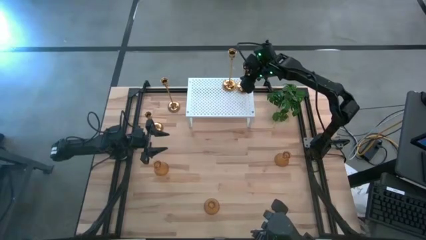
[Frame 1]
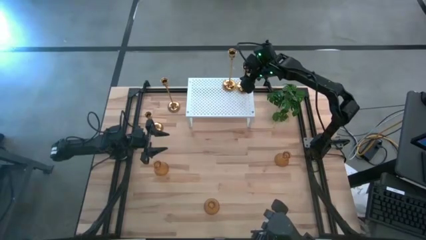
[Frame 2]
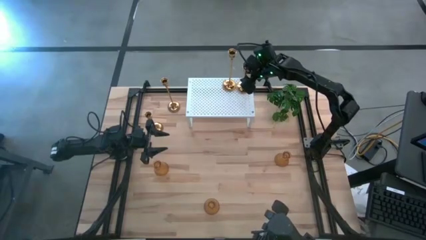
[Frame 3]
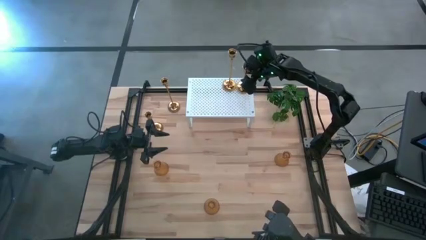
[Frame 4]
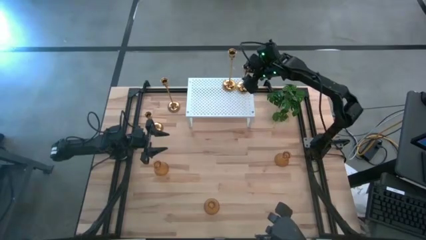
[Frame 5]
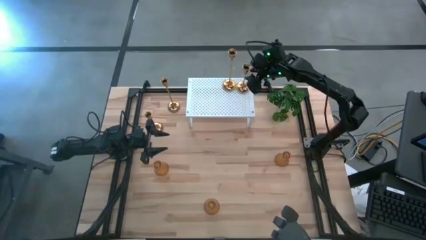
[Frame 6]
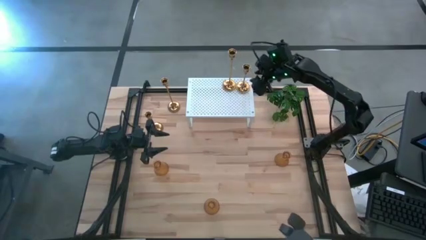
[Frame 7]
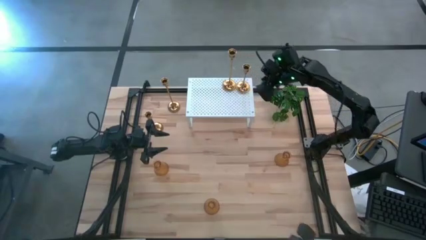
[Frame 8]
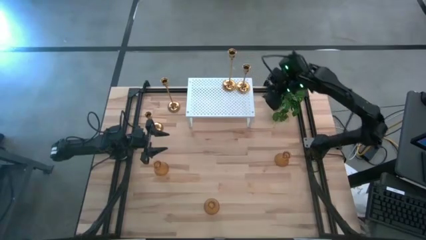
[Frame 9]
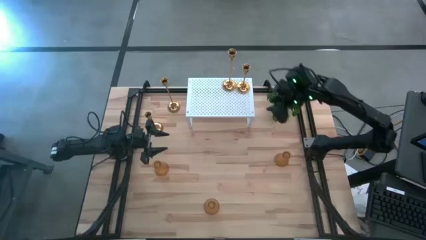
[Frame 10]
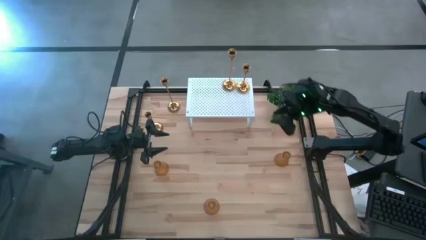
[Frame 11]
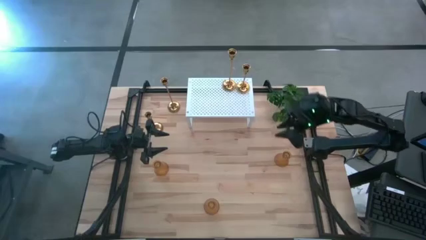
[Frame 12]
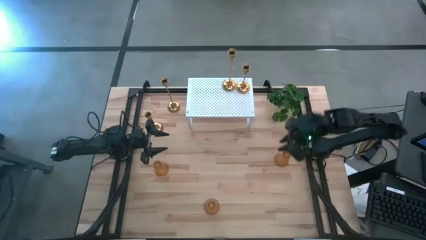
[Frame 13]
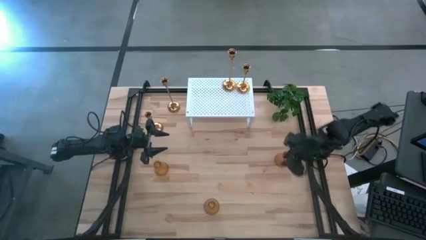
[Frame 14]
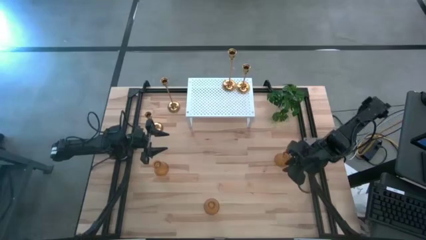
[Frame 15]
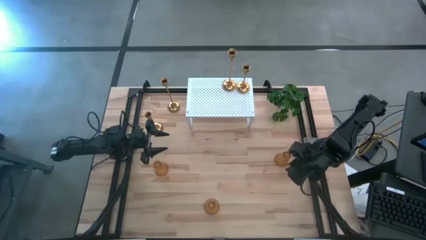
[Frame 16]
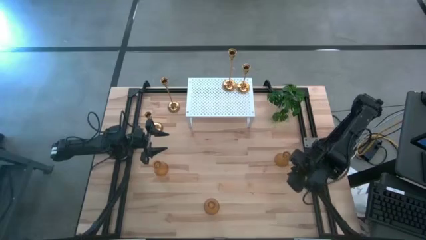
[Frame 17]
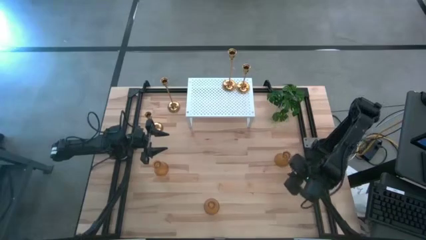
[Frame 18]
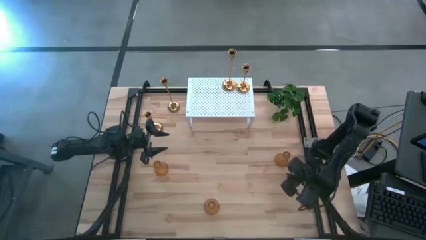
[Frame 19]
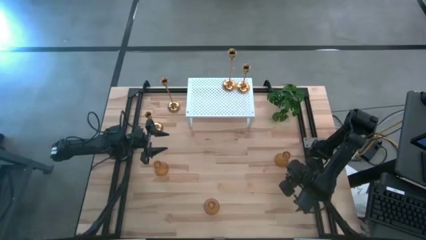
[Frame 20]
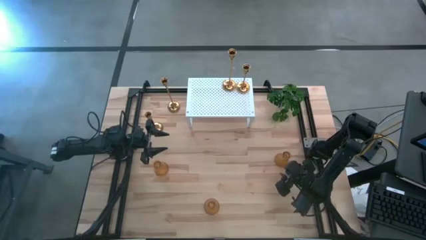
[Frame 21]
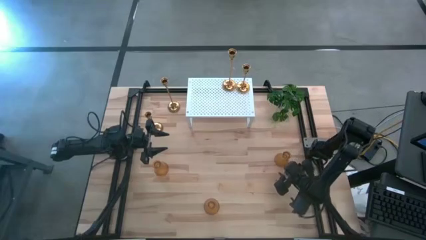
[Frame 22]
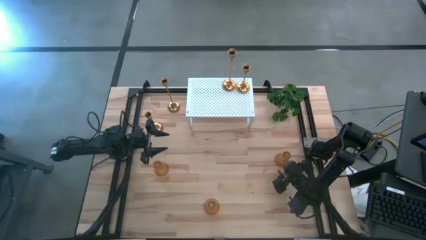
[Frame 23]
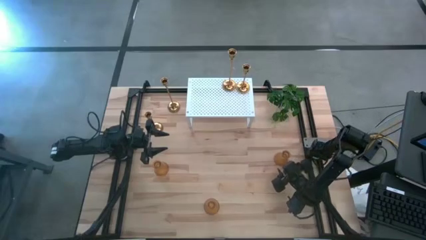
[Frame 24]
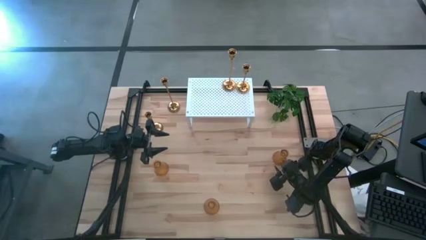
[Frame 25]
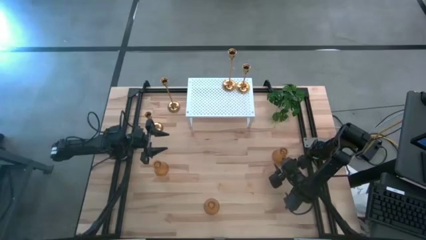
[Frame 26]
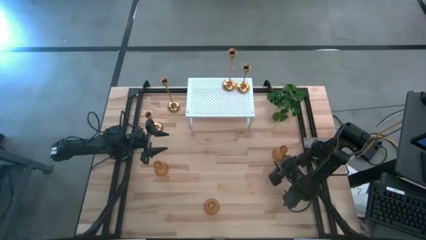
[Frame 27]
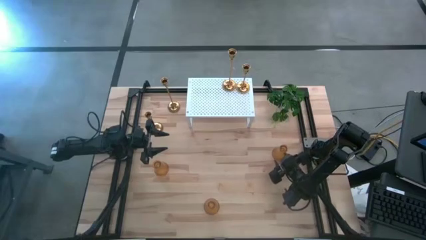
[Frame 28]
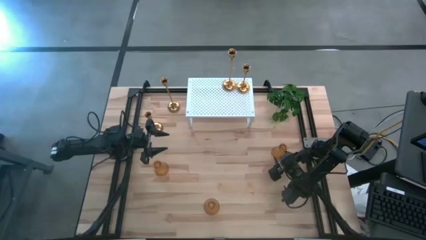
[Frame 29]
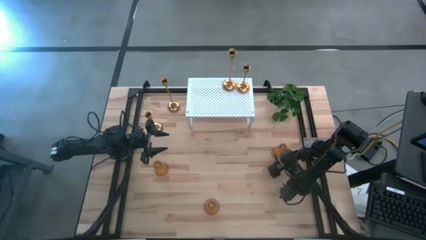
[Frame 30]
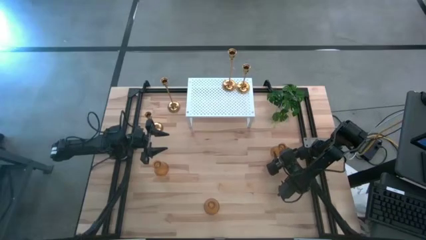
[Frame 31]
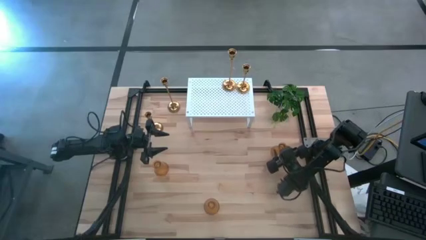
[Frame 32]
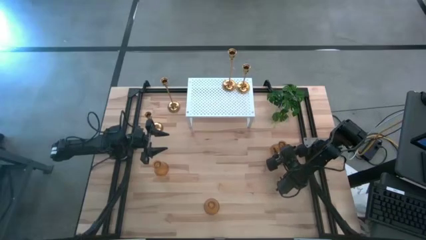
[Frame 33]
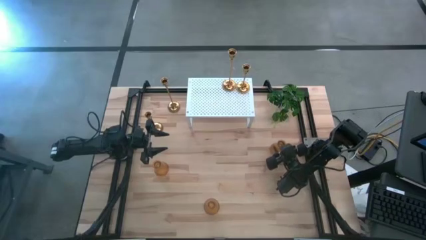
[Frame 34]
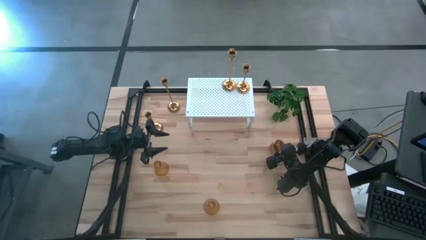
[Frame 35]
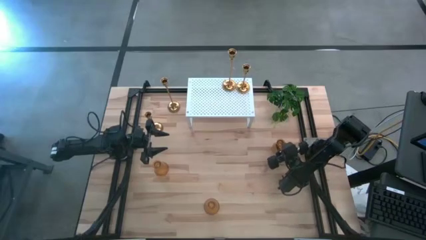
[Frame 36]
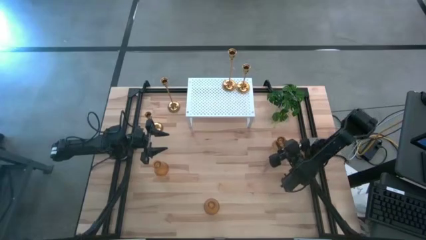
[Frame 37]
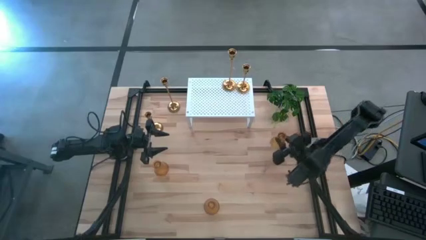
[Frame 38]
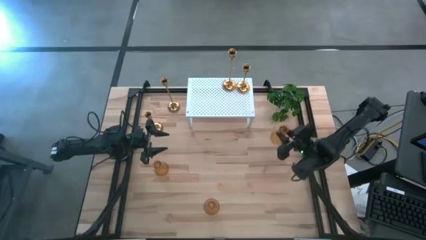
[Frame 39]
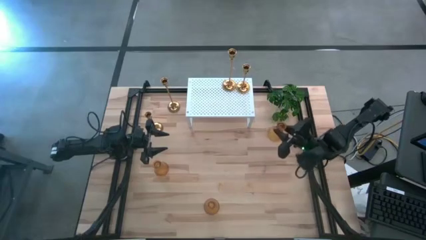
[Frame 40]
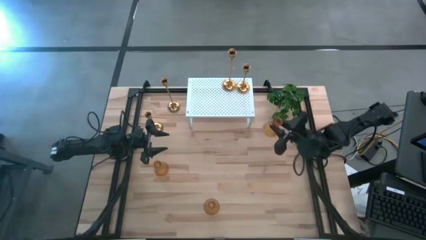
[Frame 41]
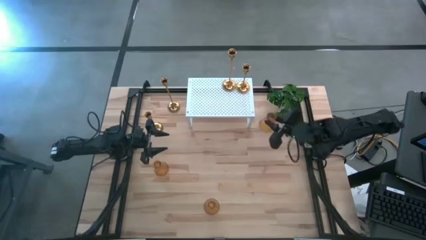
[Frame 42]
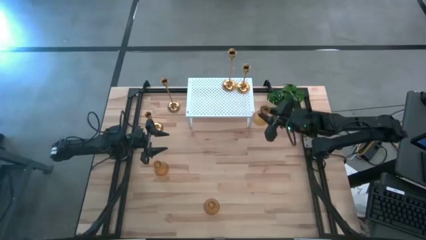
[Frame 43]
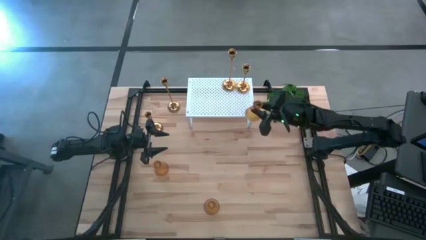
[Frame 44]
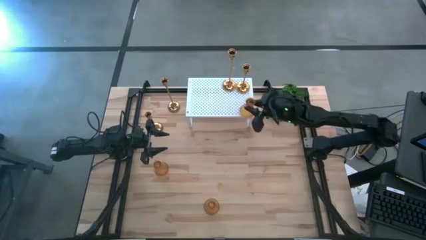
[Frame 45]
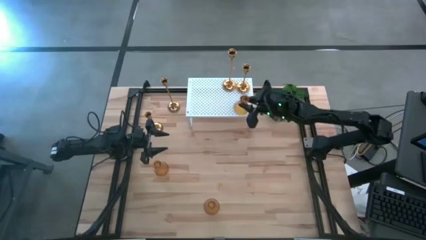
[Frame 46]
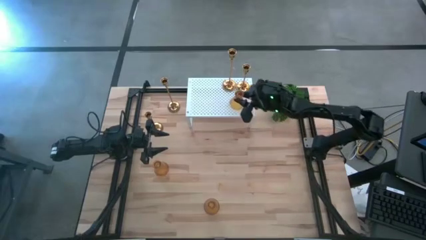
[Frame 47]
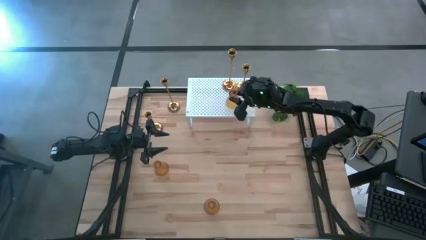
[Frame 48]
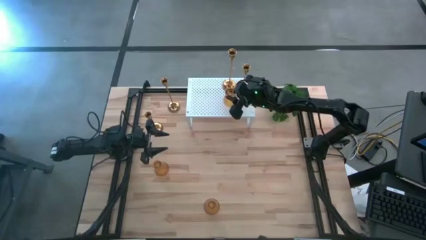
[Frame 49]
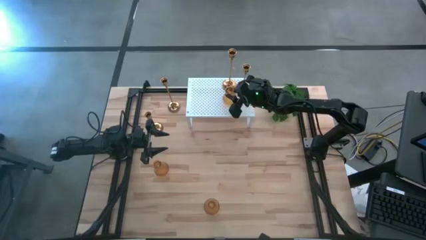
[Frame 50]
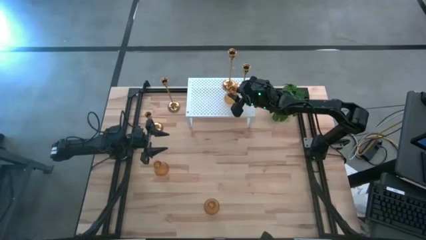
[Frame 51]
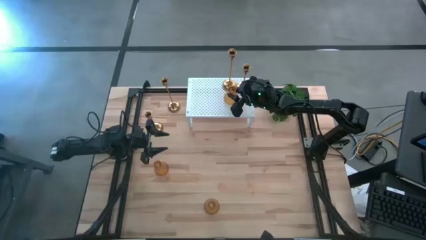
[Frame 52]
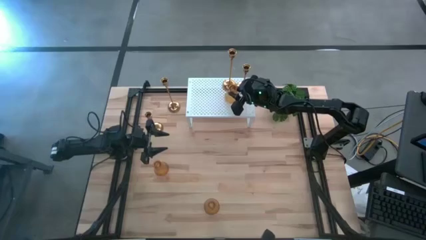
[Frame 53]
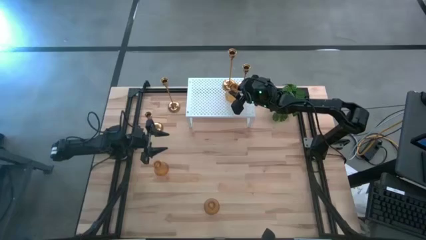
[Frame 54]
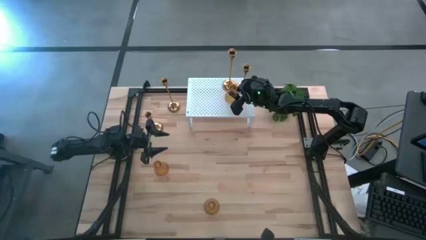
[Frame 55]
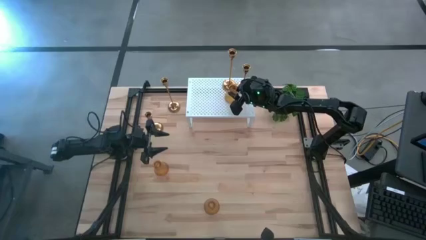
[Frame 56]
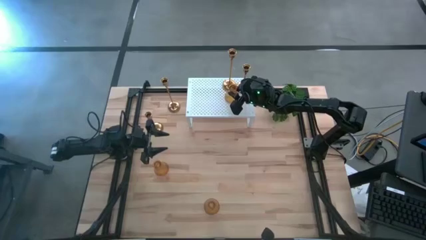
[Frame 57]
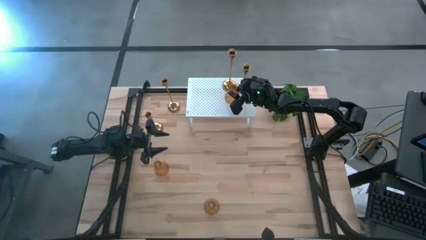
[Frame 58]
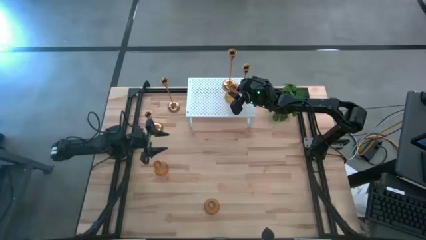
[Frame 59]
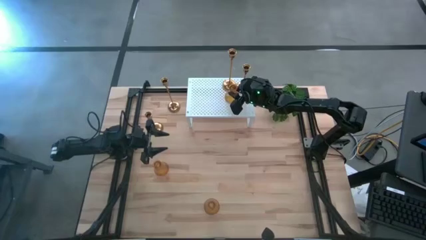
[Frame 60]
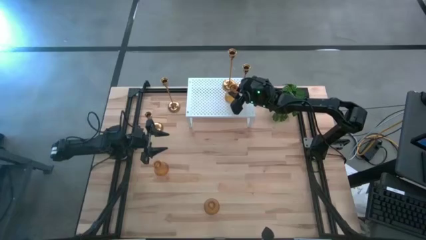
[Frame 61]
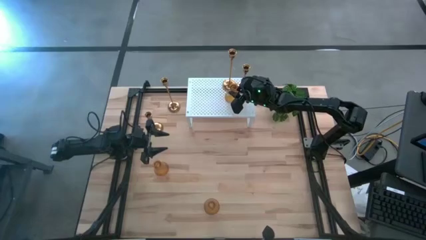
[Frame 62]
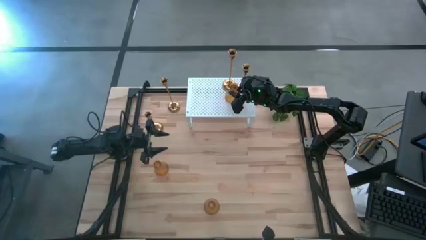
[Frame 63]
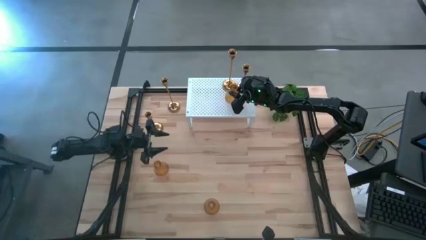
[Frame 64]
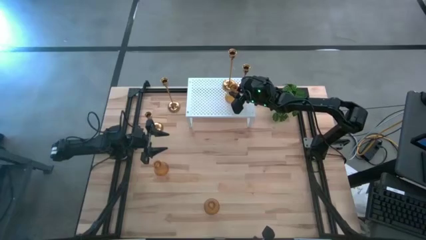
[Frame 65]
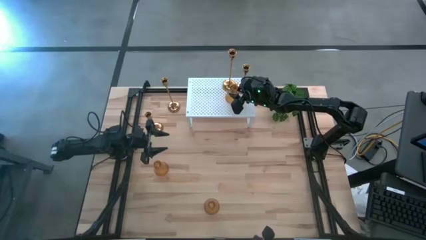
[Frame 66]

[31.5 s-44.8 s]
Task: Pick & Place candle stick holders
Put the right orange candle holder on the shelf
